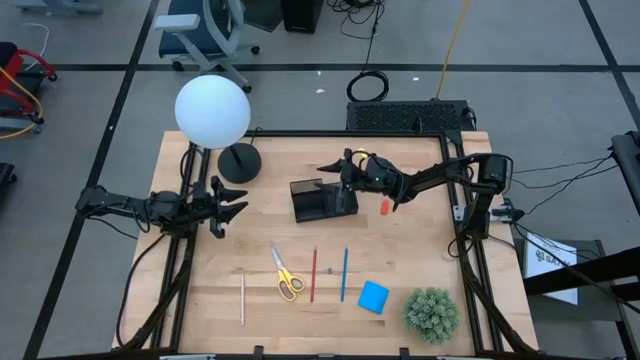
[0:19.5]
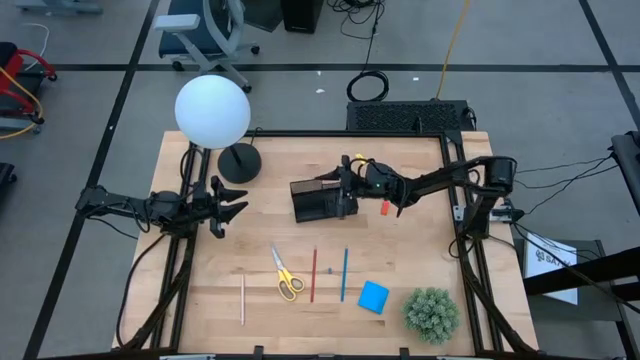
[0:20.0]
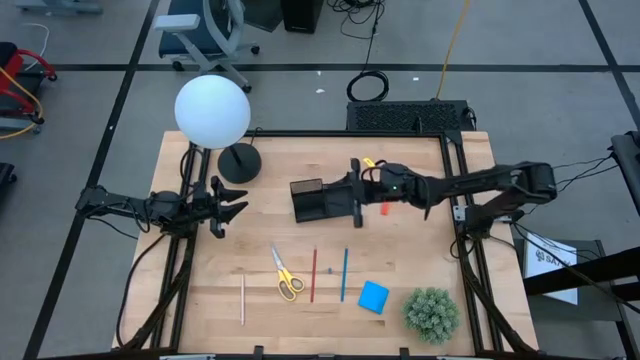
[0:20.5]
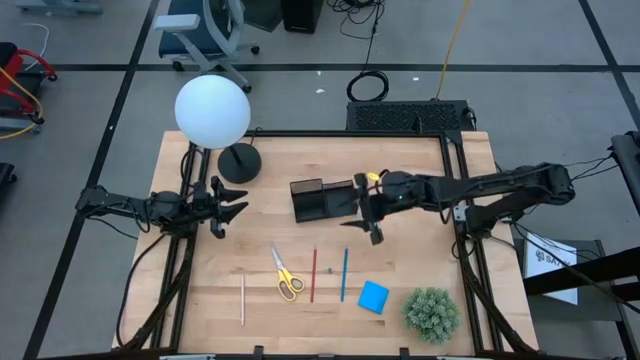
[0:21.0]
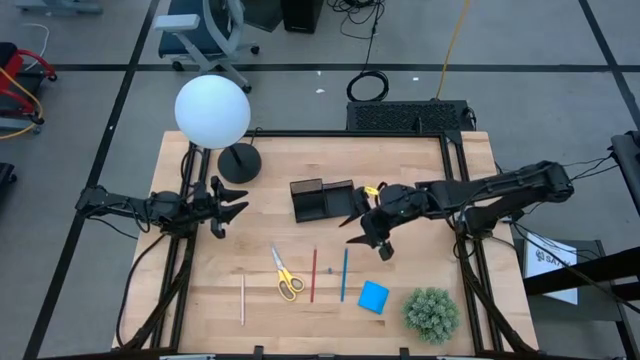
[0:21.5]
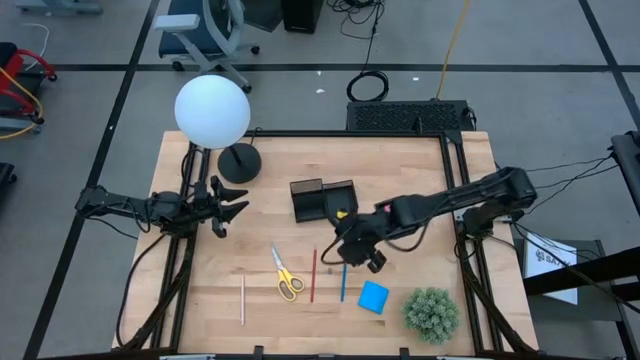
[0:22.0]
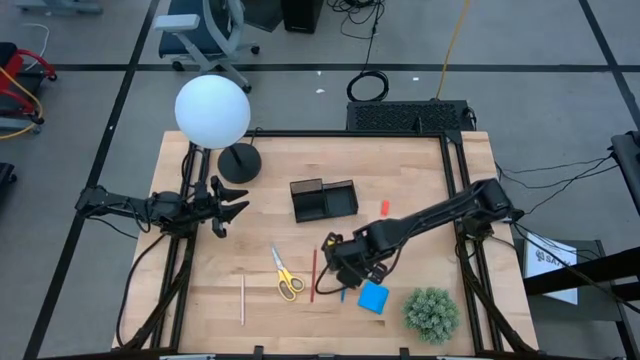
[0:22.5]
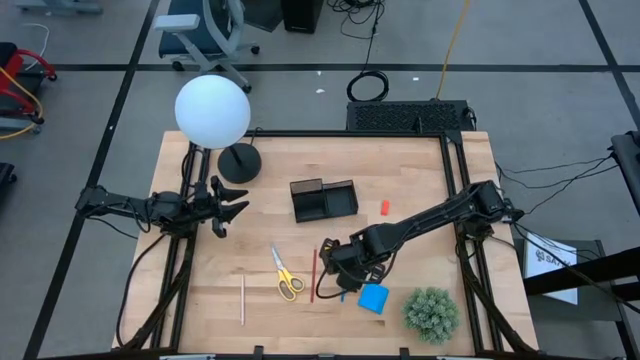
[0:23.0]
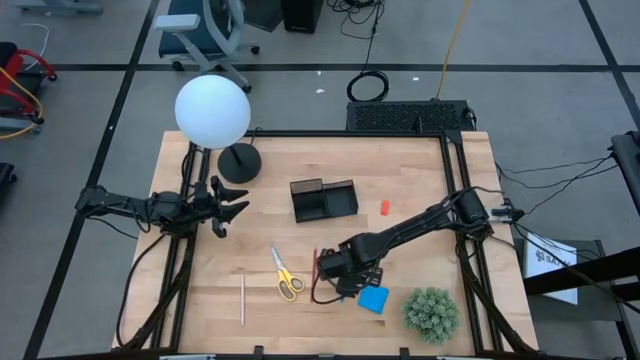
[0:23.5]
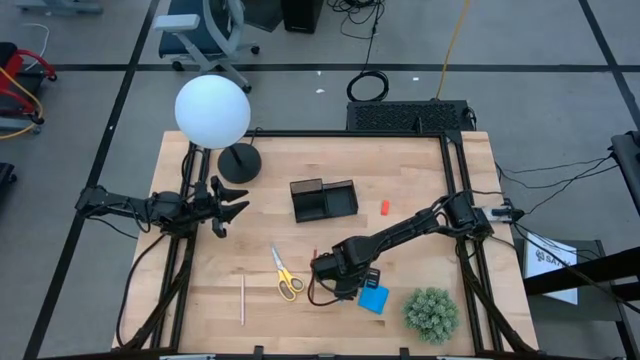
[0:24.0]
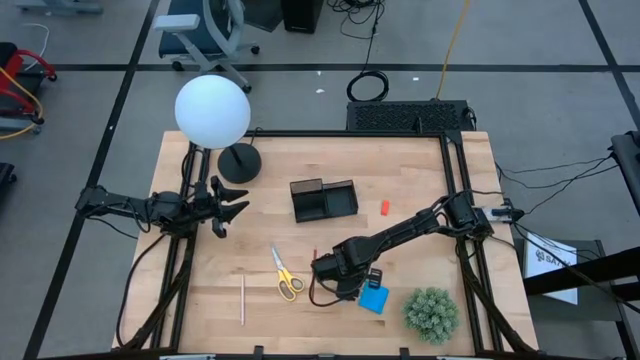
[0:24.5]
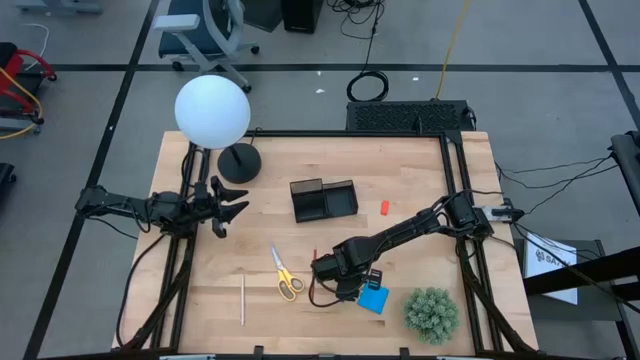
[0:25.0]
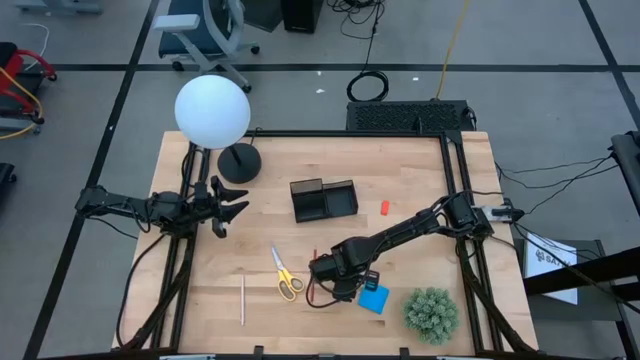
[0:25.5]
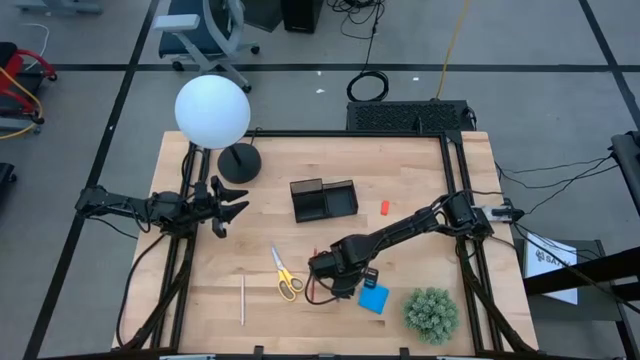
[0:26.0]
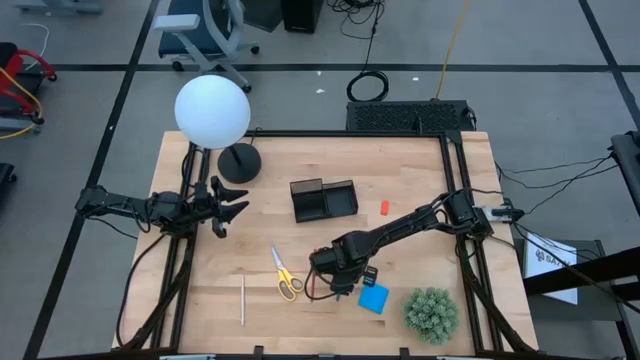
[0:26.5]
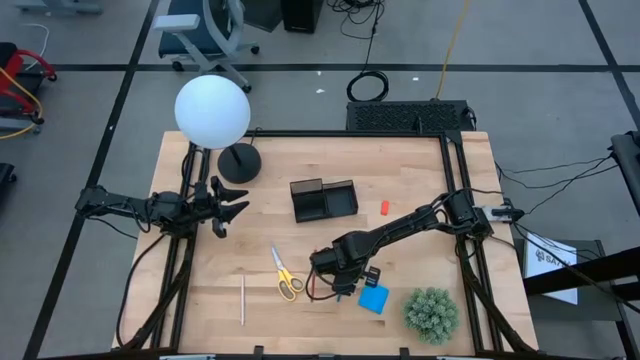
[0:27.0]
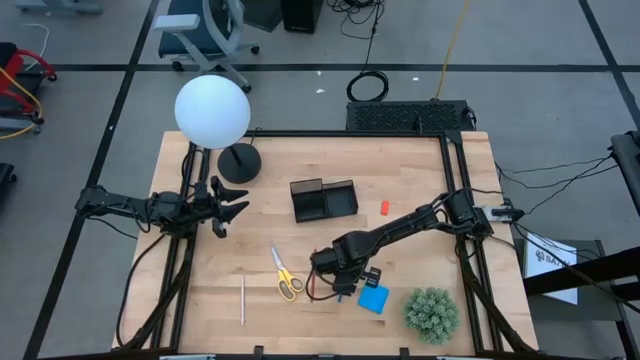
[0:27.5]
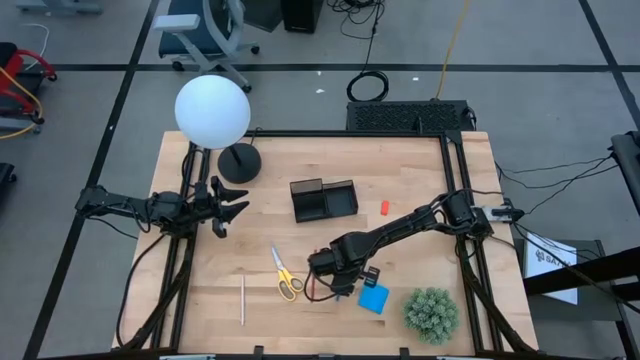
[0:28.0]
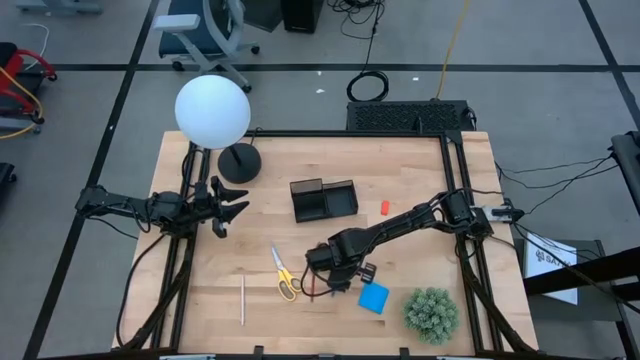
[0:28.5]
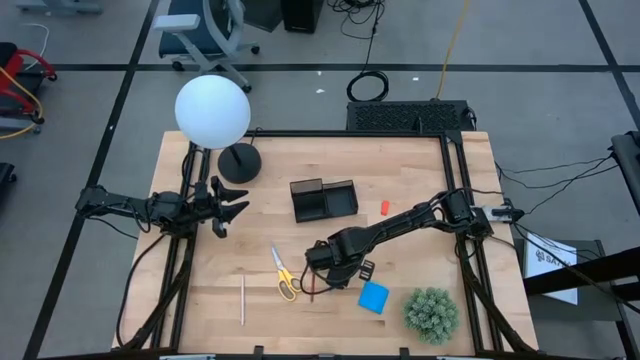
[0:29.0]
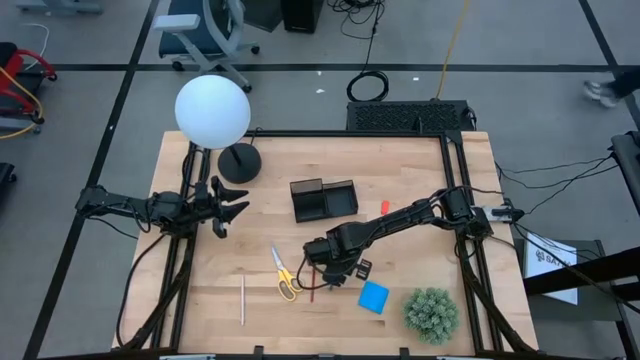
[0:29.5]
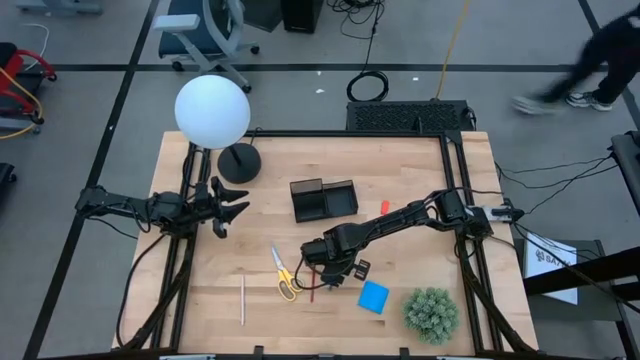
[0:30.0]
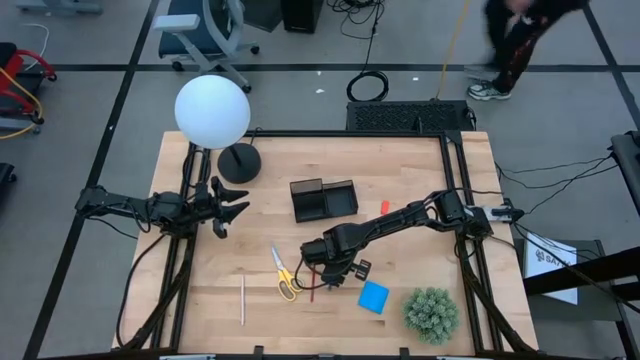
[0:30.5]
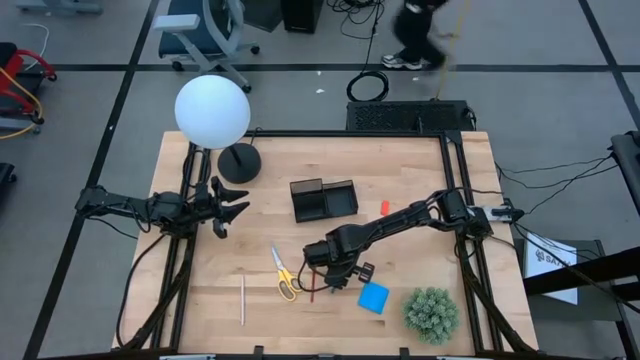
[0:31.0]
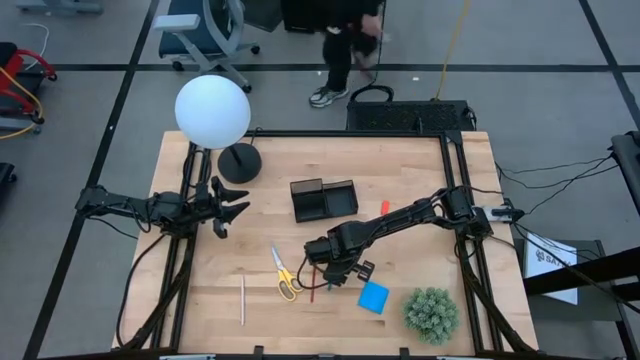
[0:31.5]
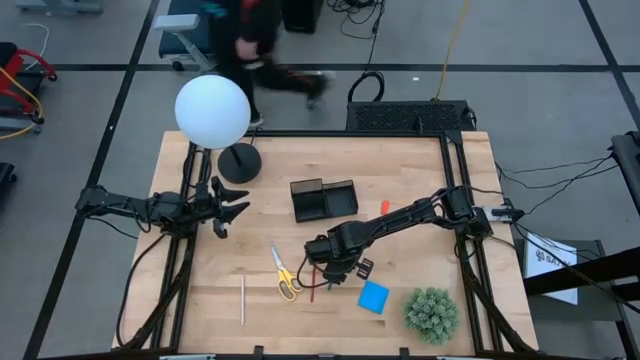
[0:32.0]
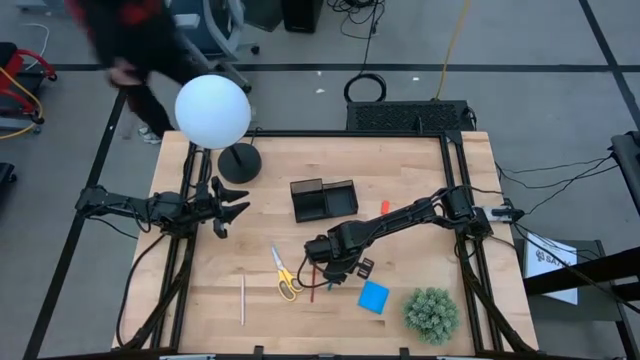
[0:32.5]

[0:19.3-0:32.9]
Task: Pick and place office supplies into organizer
Put the blue pencil into the desk organizer
